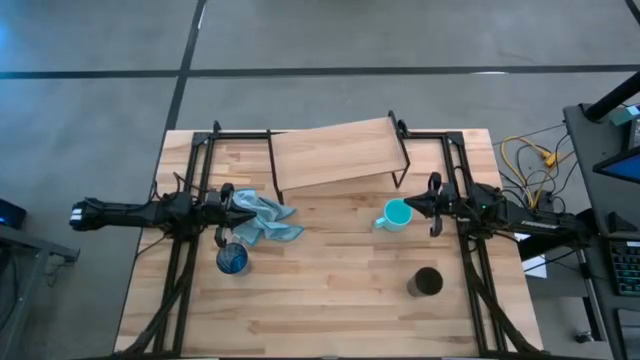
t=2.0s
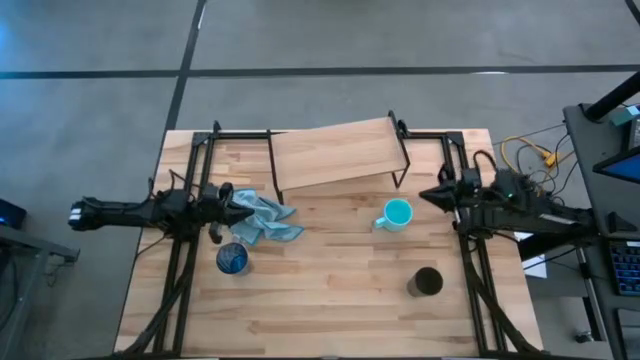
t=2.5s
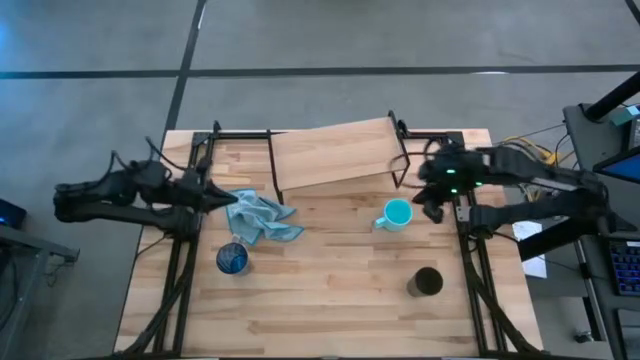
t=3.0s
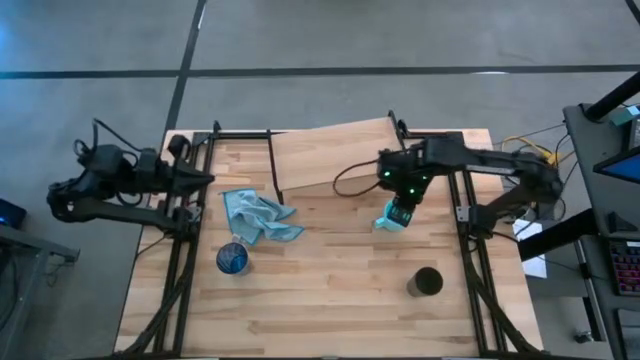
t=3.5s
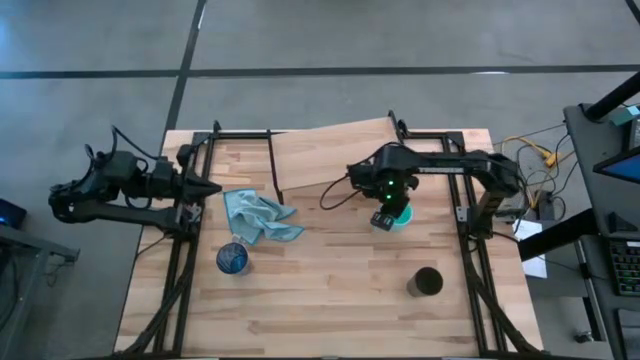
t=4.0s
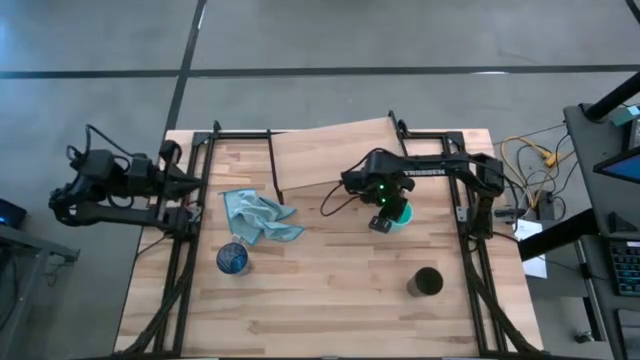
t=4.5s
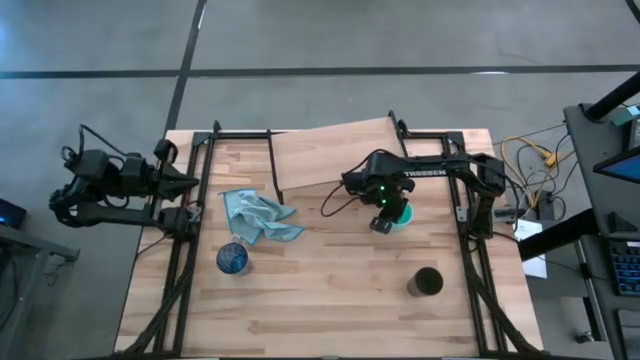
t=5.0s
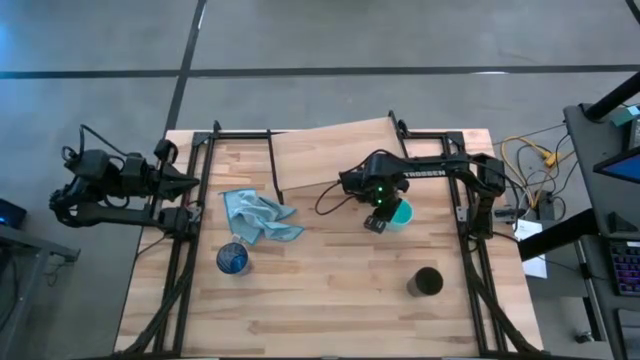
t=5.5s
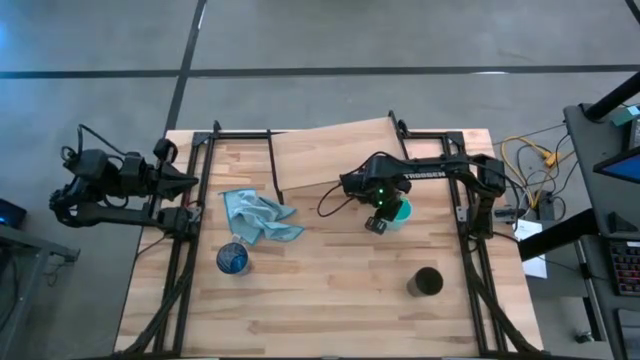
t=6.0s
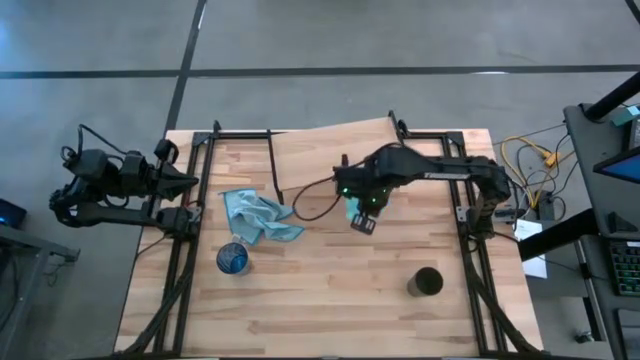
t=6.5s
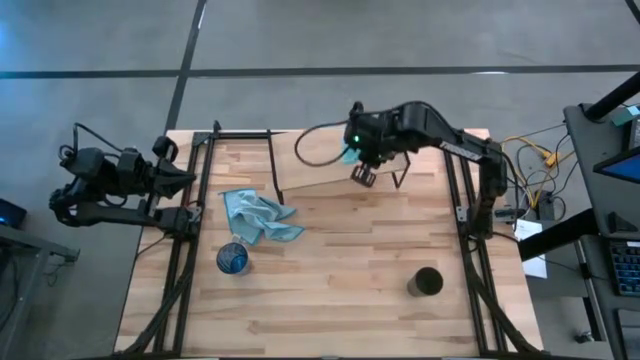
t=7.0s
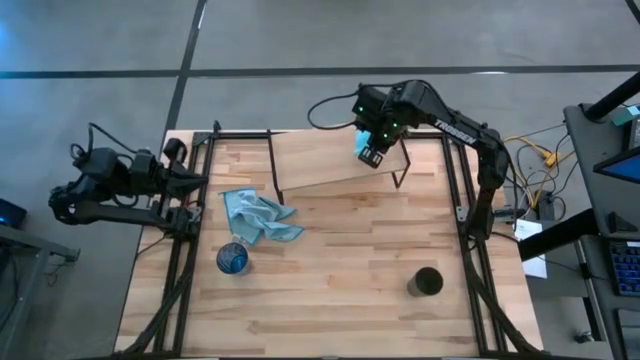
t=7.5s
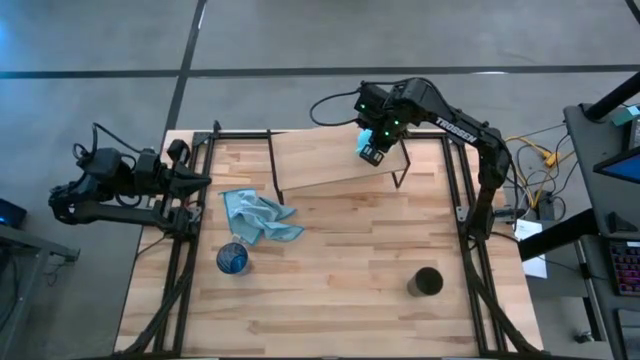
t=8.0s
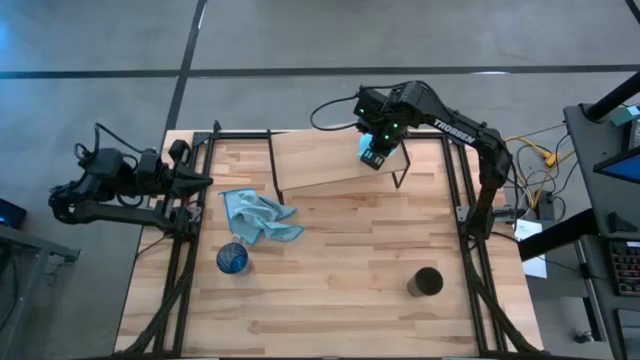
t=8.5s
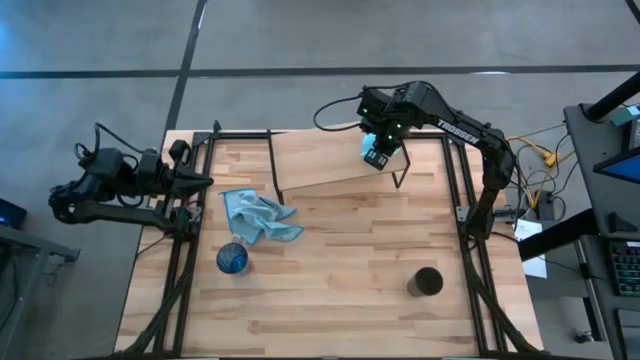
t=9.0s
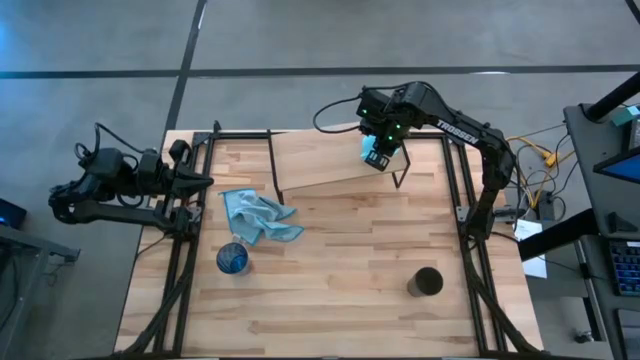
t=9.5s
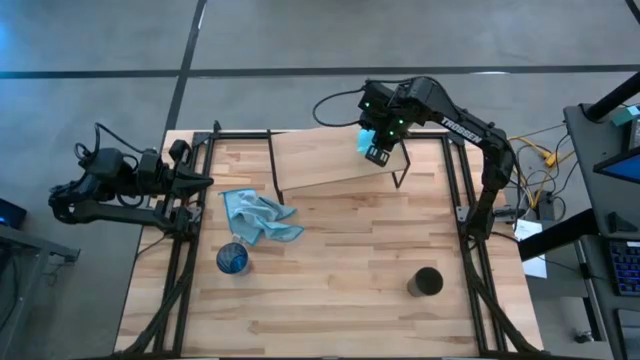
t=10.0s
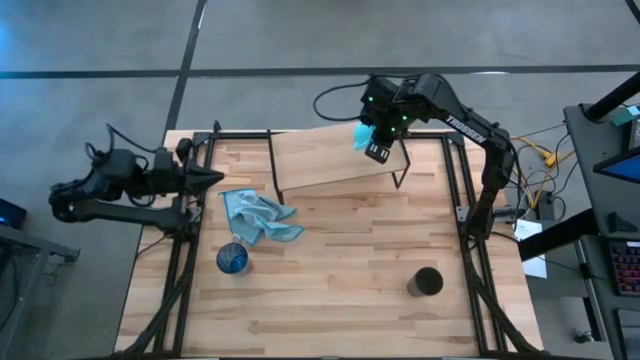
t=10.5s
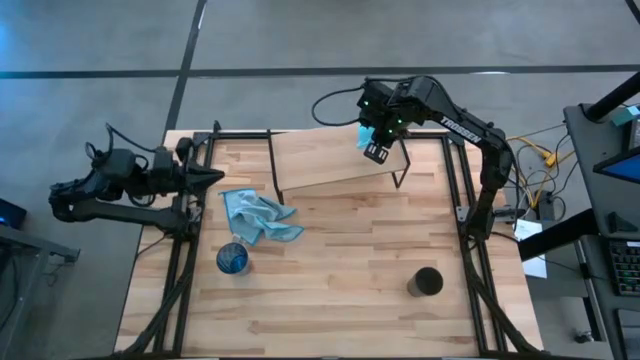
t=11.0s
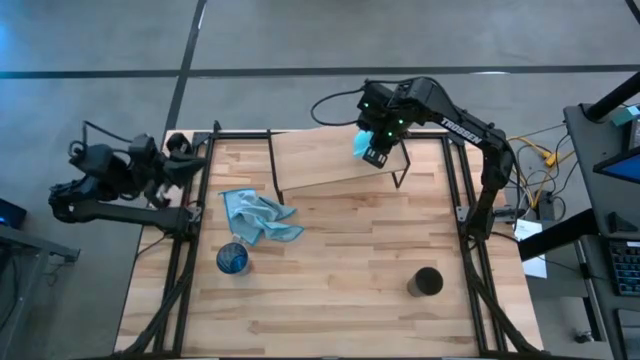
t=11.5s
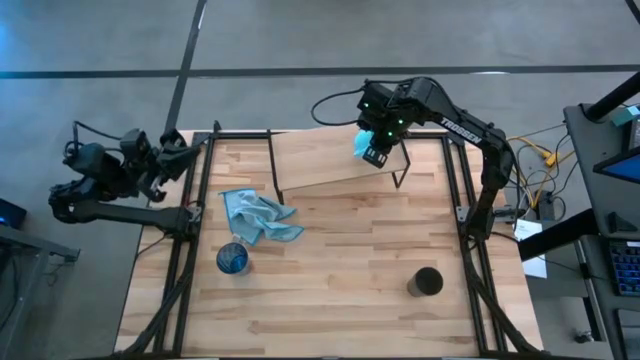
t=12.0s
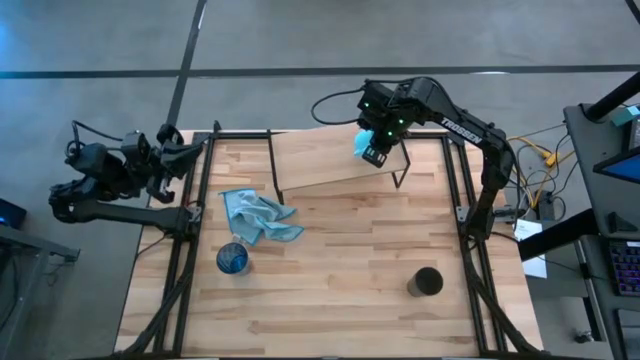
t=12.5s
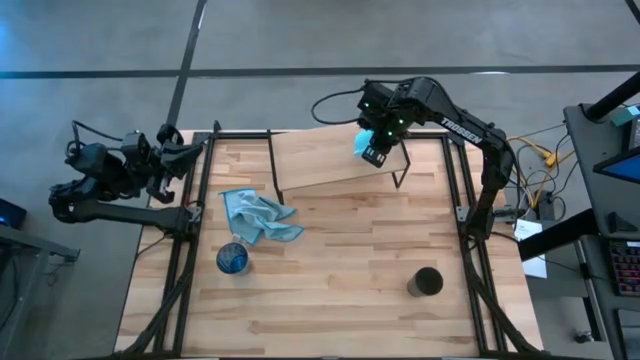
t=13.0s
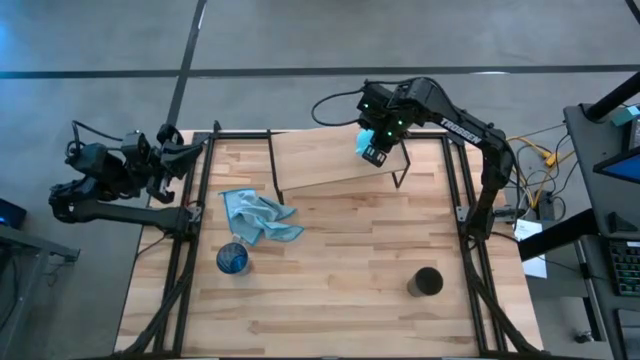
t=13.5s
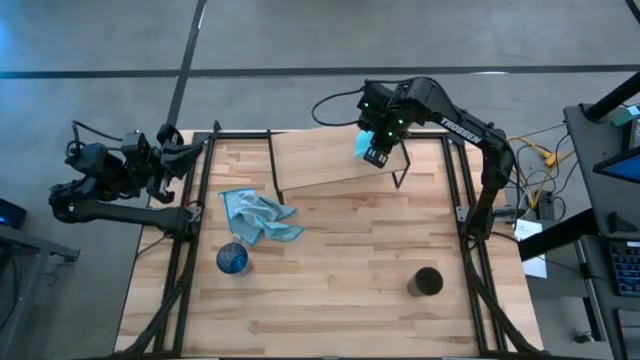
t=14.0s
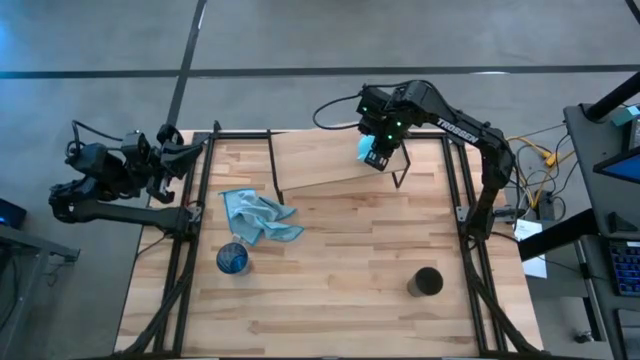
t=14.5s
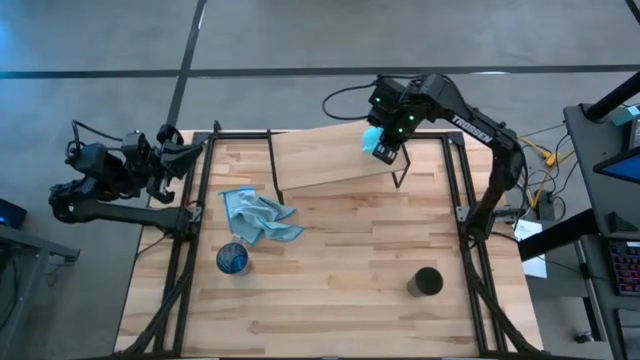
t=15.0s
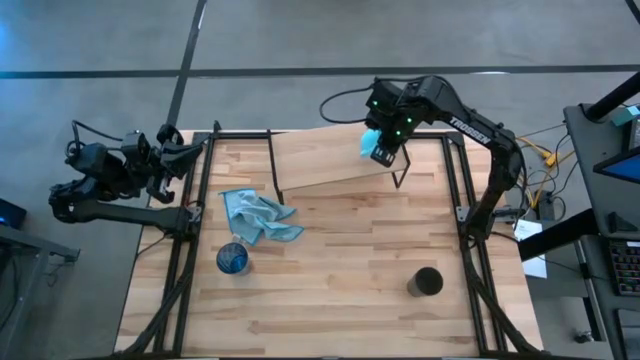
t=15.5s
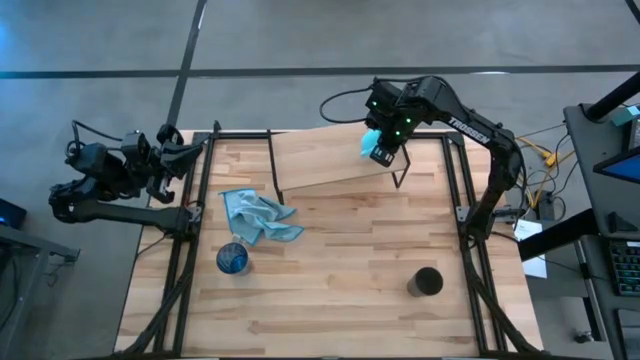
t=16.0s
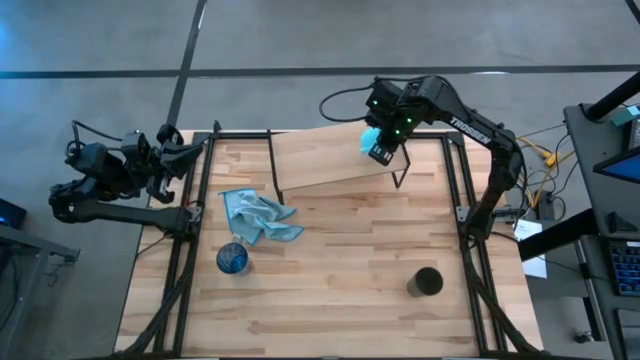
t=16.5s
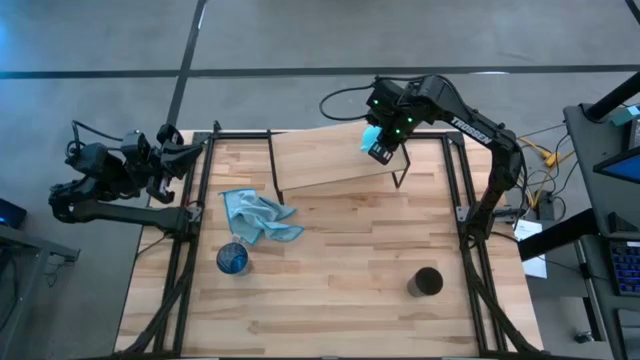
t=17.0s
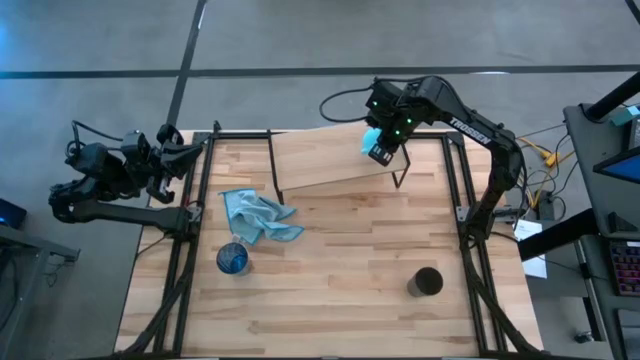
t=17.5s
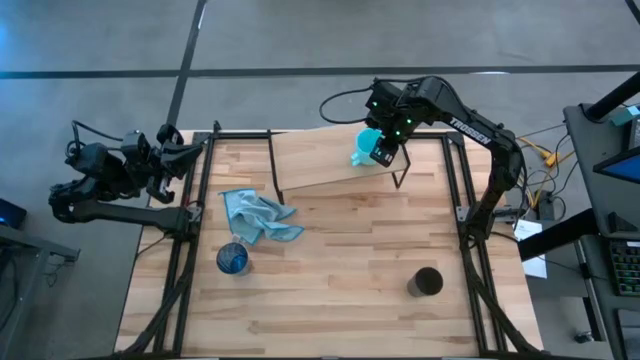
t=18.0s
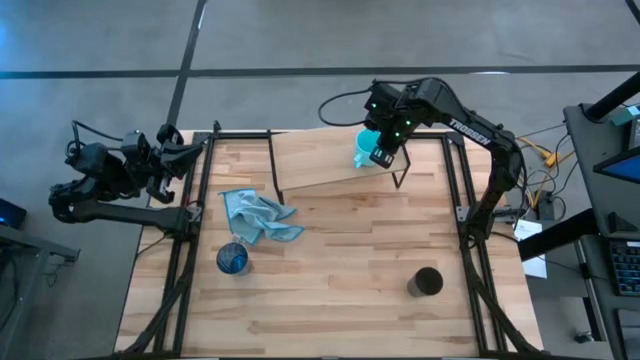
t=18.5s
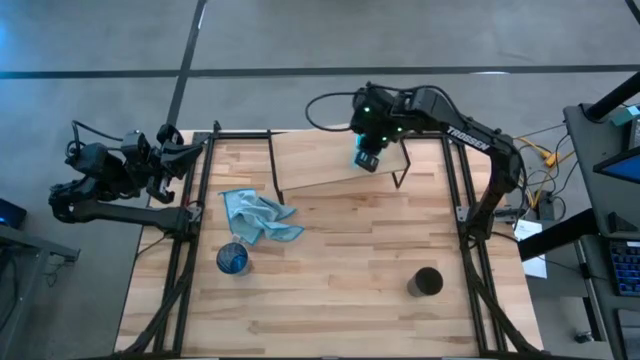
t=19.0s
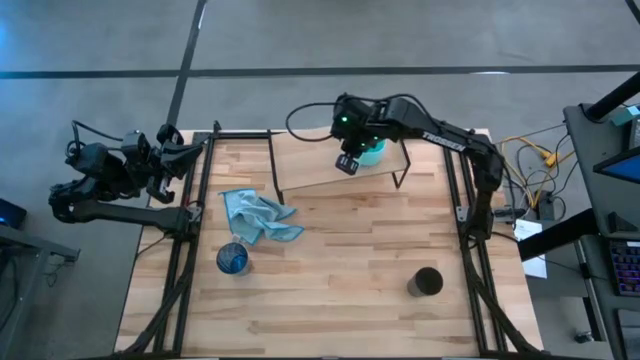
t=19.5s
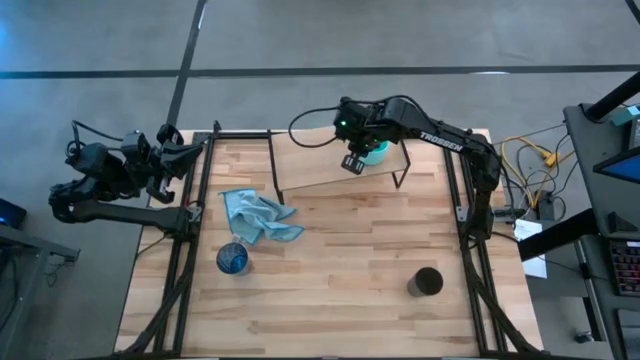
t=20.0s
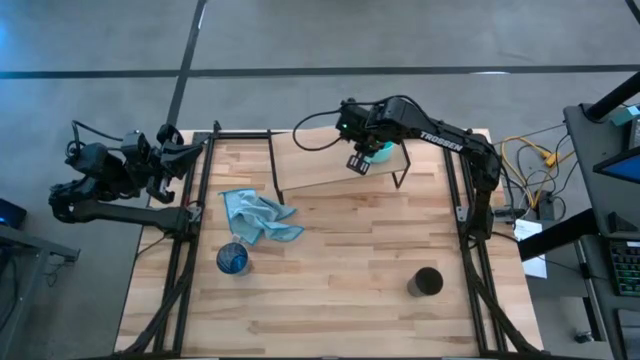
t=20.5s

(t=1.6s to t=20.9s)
Task: Stack small to large cups/mugs on shelf
Put the light blue mug on the shelf
